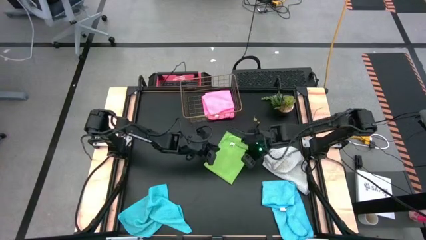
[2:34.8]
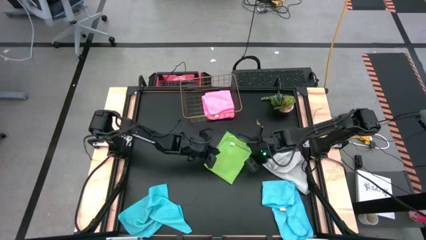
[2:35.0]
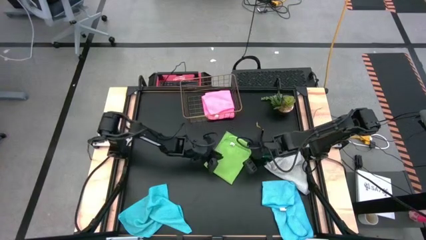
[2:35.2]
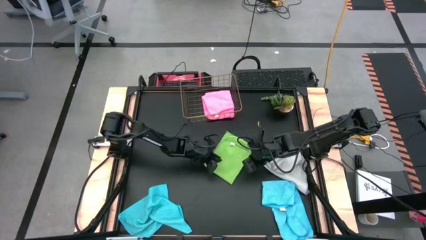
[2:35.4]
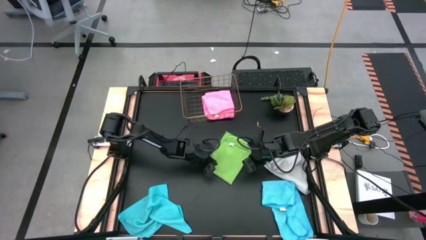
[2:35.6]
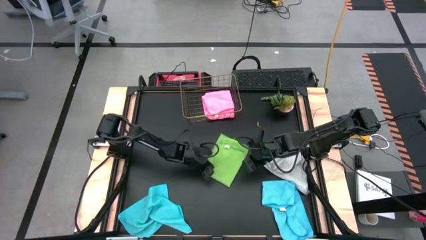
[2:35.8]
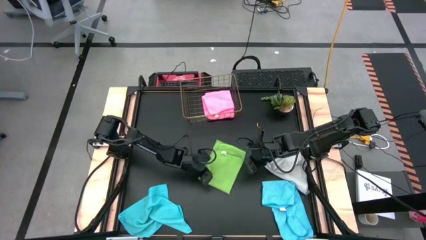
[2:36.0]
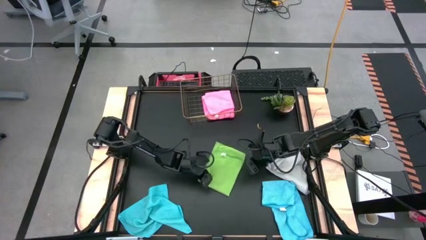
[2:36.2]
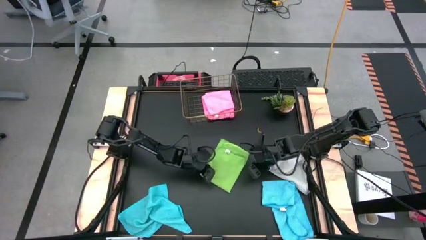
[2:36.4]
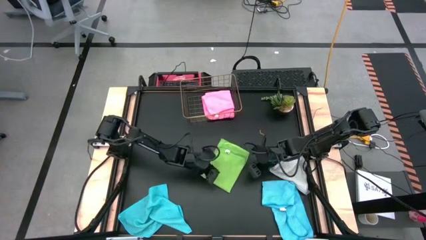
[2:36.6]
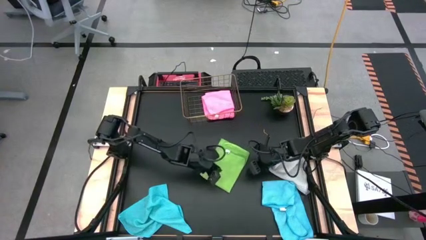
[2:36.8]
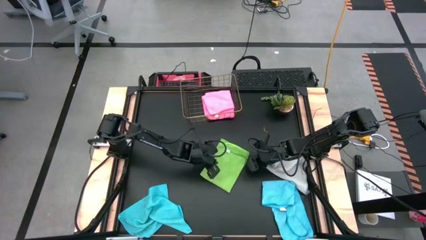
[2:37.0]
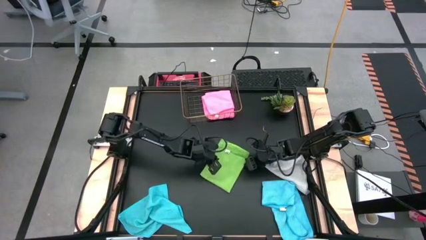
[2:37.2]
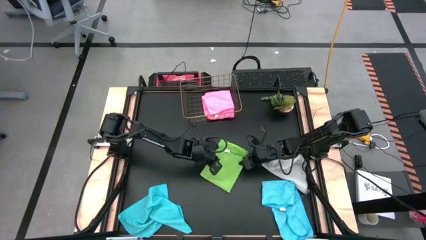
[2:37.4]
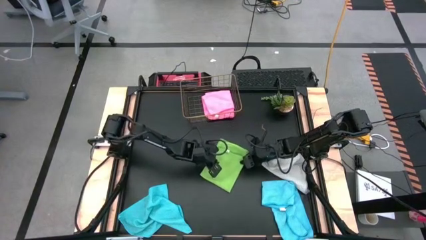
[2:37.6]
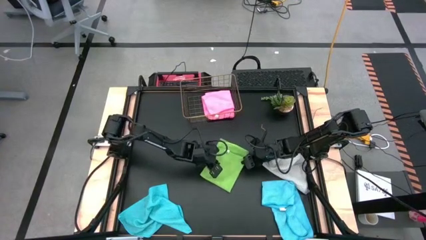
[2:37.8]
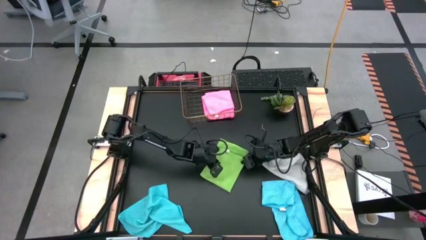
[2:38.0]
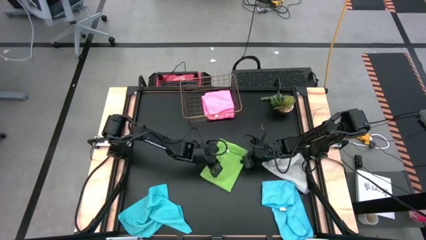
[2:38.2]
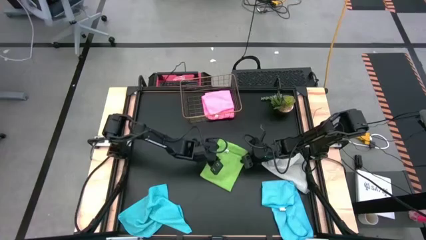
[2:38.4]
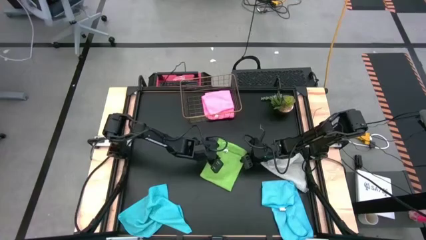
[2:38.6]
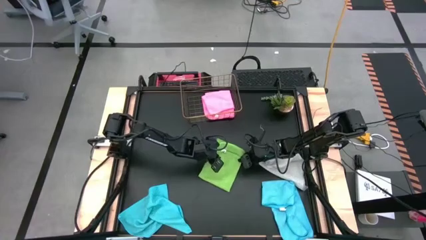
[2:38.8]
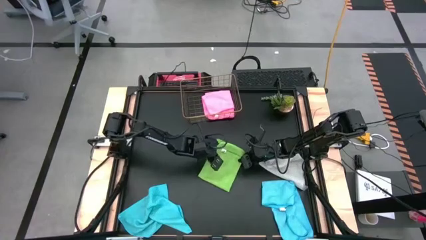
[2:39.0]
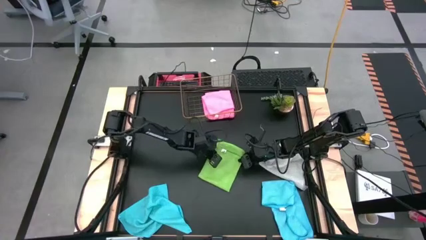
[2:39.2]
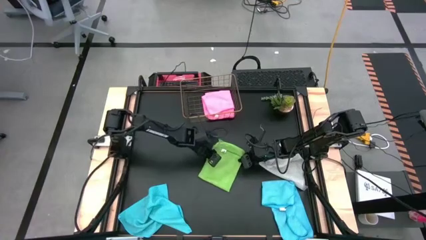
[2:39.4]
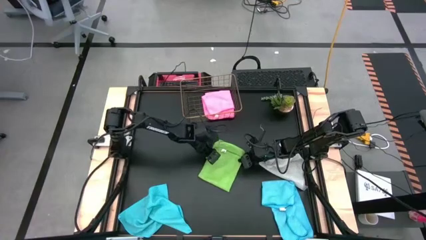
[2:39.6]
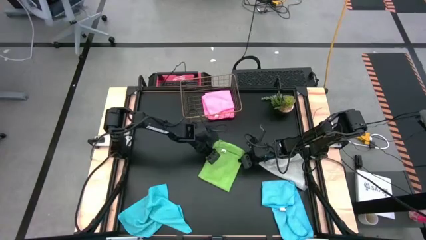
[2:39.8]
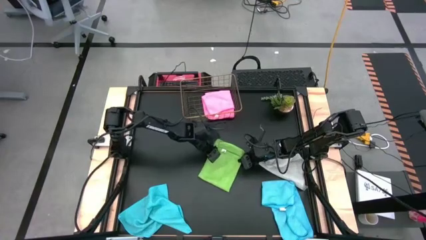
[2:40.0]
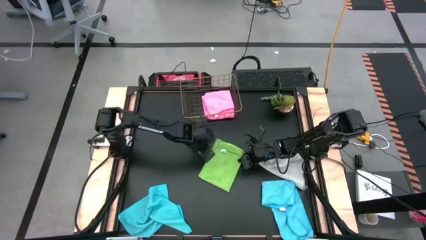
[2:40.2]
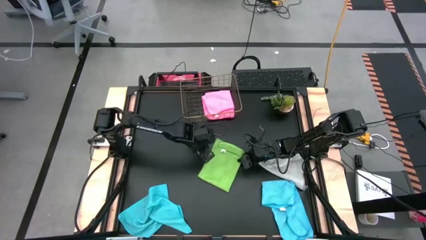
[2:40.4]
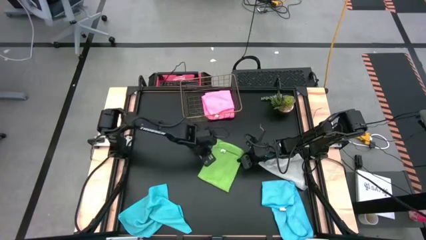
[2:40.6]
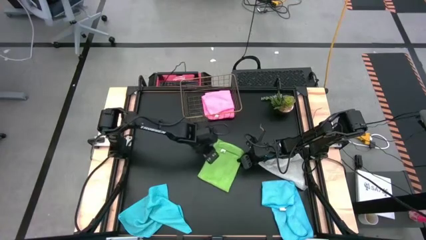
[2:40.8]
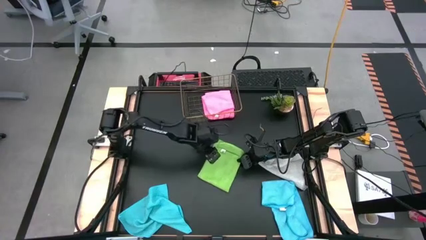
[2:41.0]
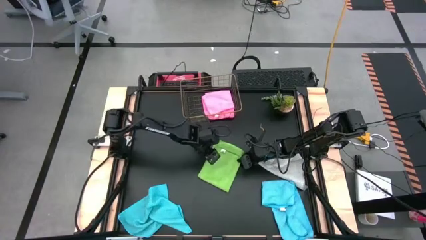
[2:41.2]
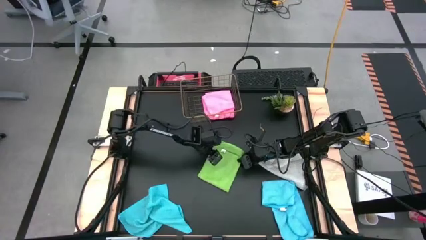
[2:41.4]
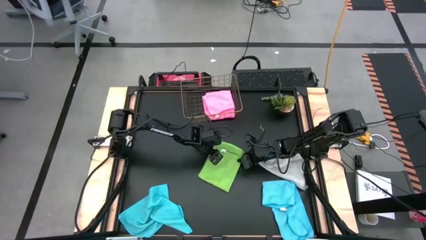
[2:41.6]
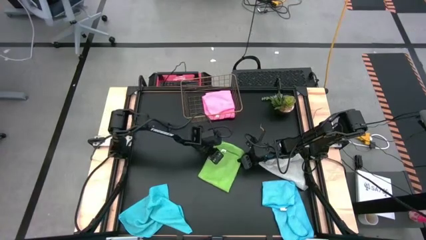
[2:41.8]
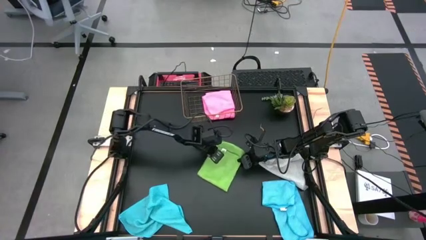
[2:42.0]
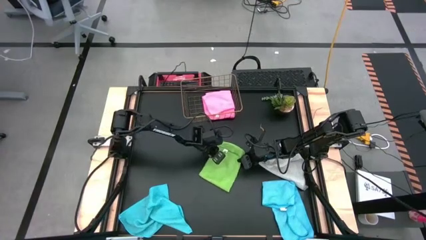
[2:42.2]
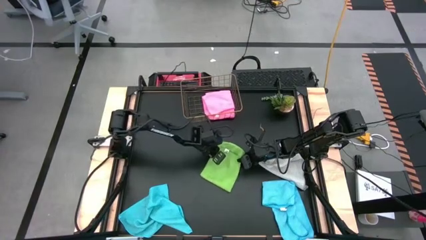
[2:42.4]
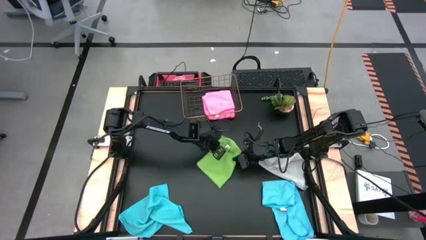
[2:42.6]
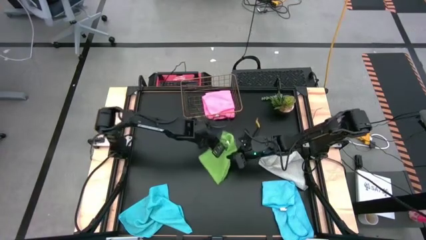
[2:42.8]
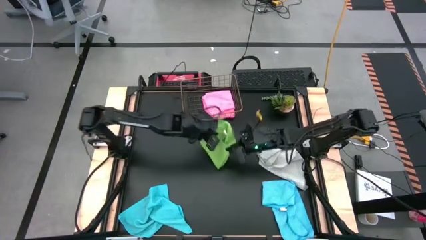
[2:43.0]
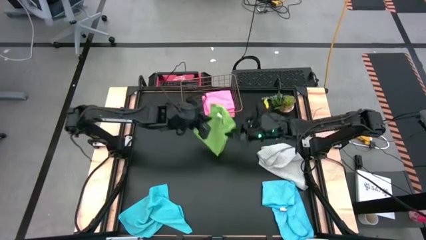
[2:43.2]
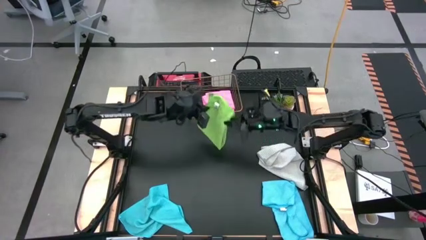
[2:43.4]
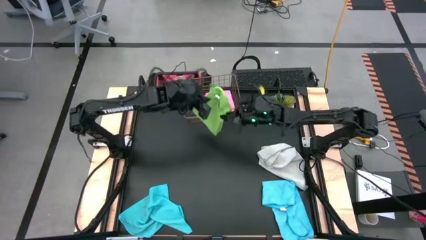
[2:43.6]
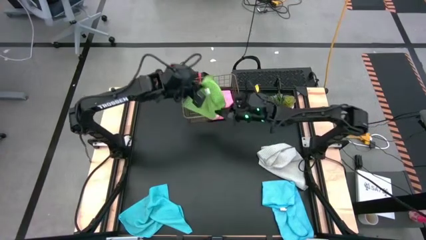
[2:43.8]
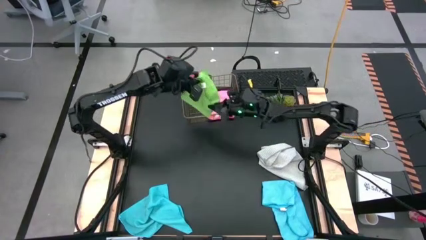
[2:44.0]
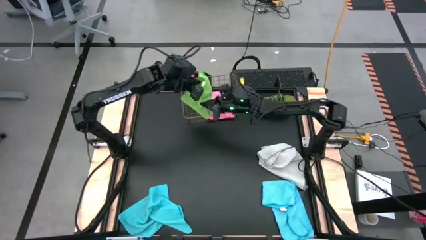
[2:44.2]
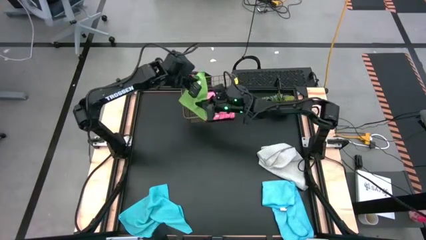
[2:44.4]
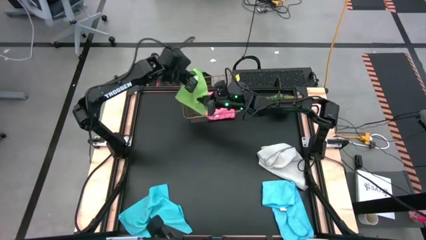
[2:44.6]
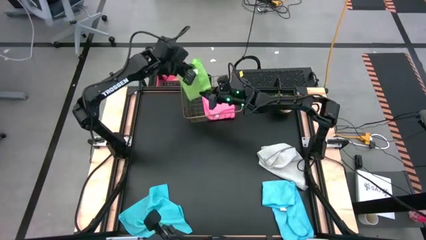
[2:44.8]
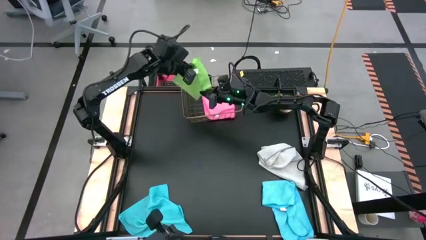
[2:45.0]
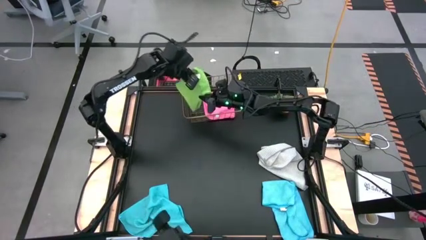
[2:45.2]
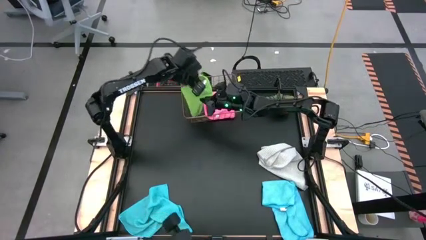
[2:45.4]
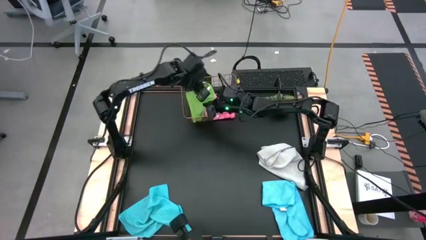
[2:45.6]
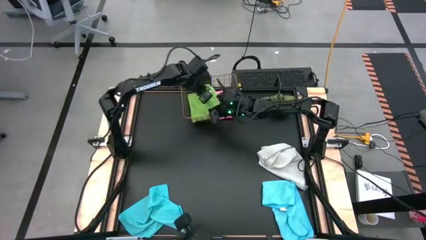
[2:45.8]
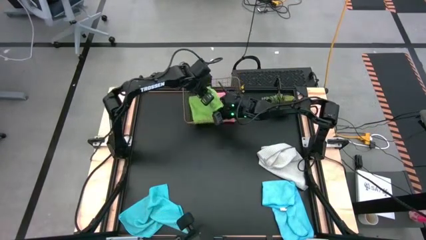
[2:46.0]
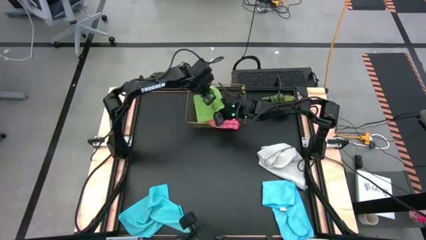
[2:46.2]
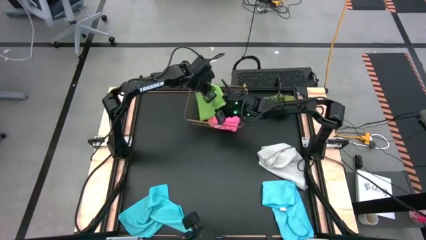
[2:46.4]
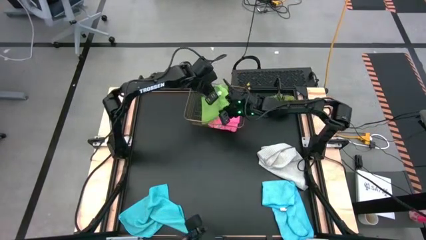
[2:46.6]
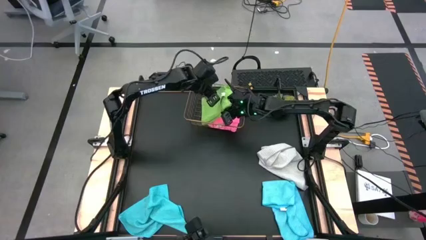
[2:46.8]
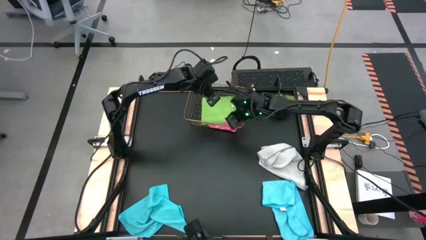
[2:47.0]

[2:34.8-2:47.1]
Task: Fold microfiber towels
Stack the folded green microfiber cloth on top of the folded pink microfiber cloth in the wire basket

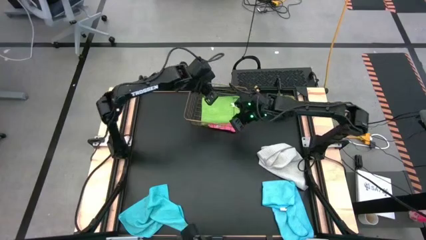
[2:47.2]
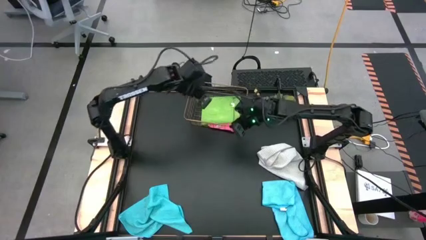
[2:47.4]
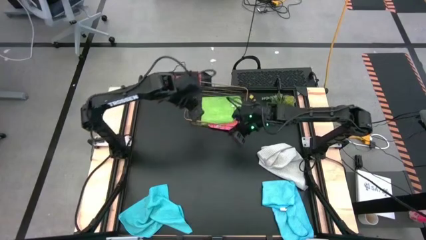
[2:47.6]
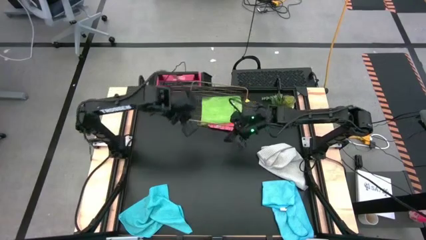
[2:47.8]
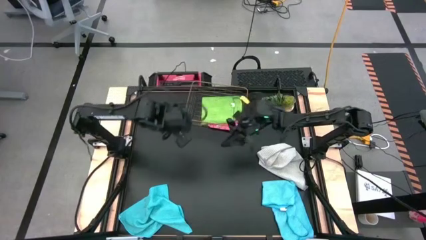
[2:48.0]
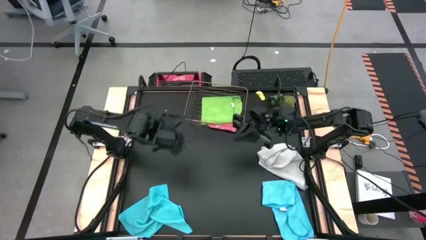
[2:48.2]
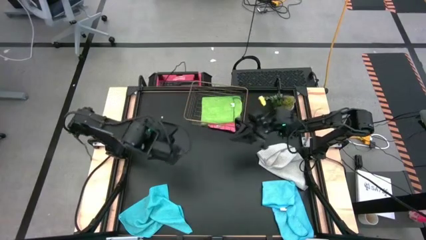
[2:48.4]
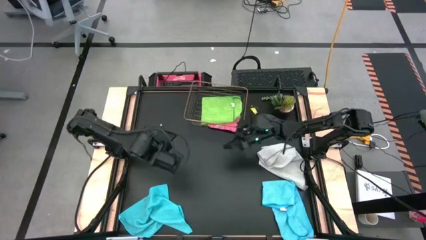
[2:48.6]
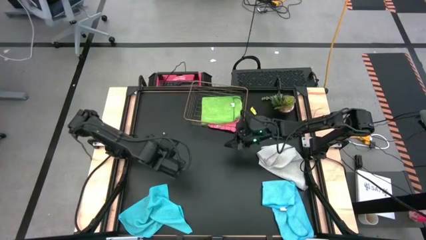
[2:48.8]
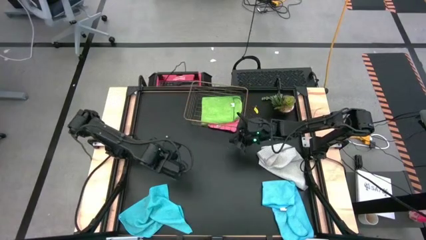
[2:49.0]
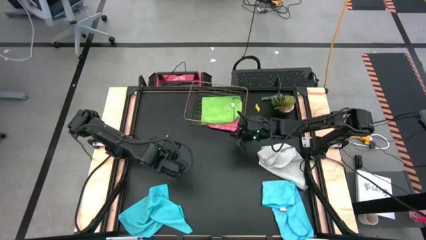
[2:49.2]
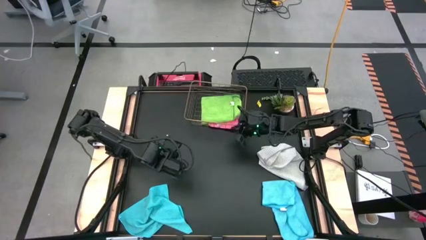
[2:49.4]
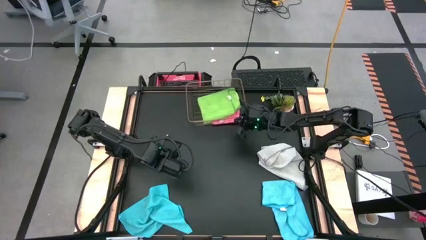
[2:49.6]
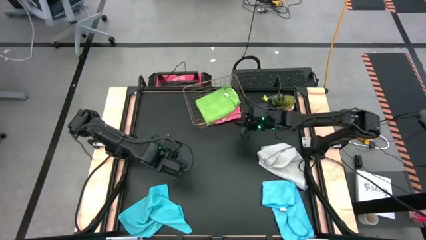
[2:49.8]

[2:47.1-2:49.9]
Adjust the wire basket
